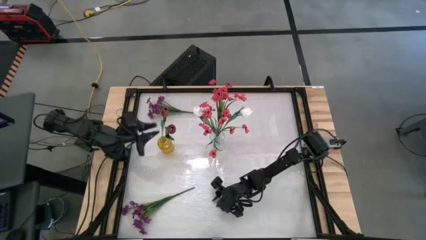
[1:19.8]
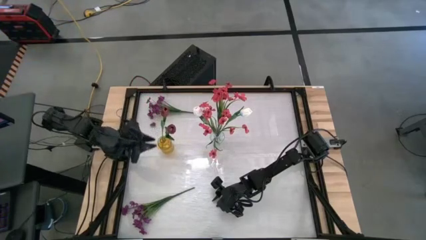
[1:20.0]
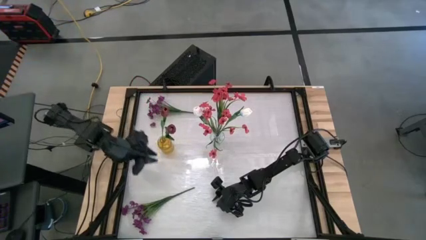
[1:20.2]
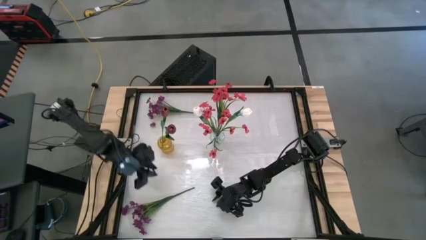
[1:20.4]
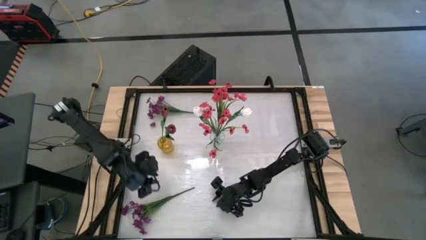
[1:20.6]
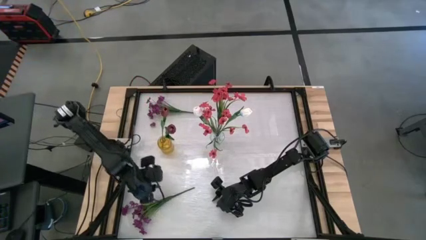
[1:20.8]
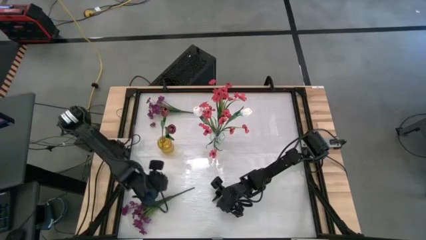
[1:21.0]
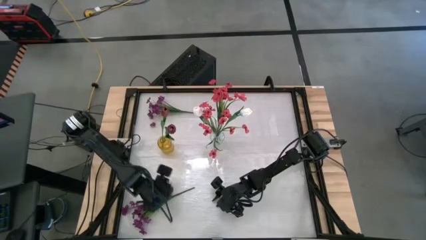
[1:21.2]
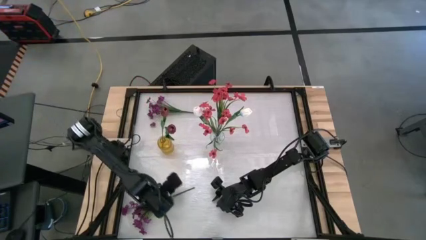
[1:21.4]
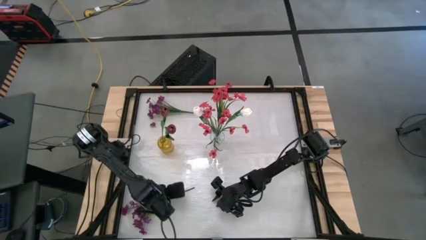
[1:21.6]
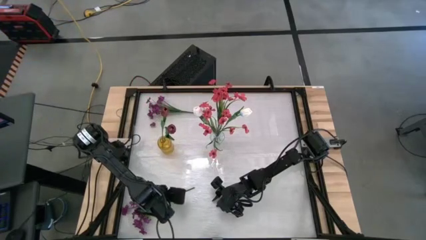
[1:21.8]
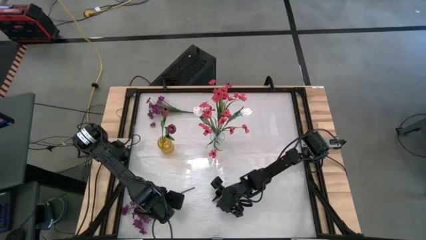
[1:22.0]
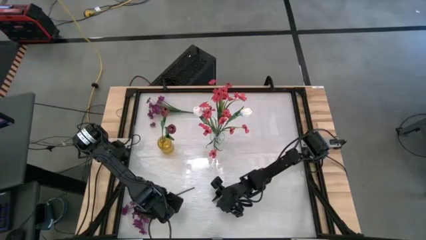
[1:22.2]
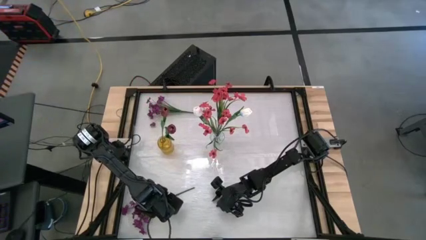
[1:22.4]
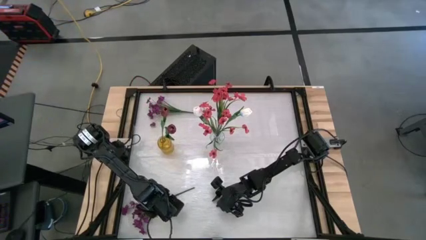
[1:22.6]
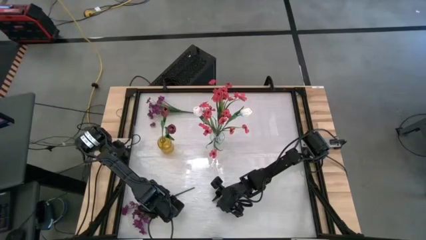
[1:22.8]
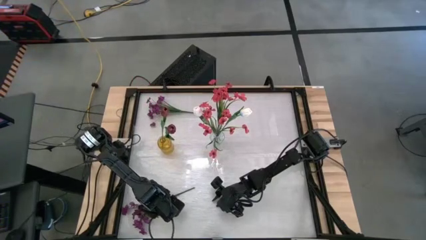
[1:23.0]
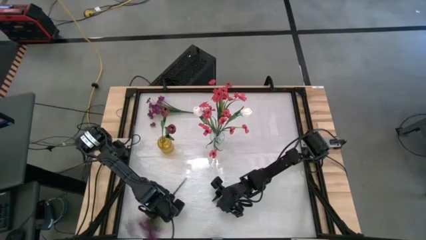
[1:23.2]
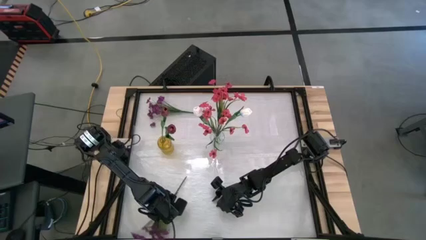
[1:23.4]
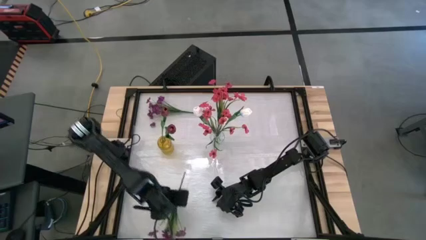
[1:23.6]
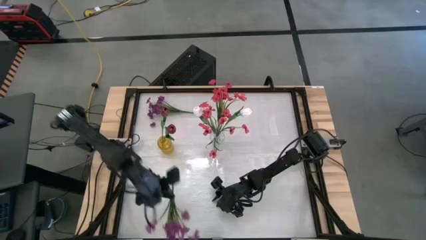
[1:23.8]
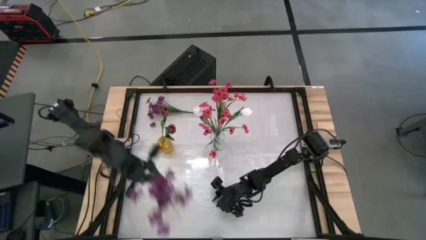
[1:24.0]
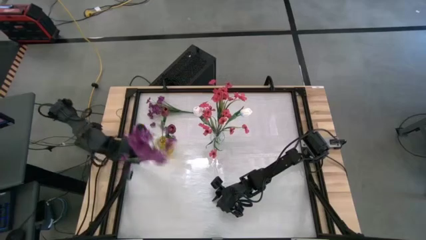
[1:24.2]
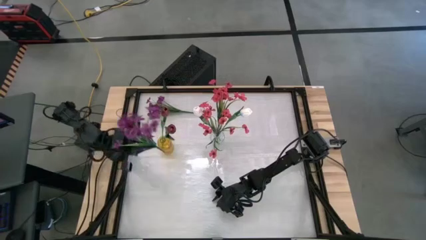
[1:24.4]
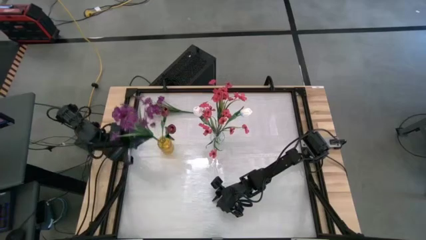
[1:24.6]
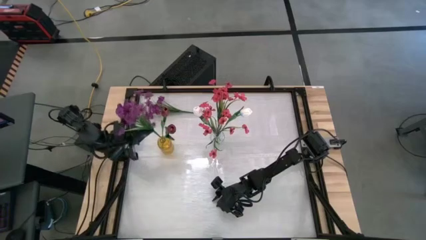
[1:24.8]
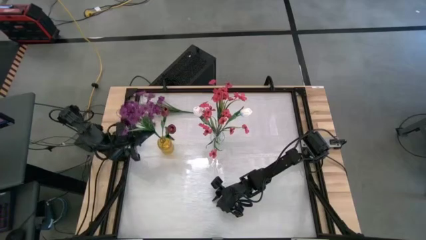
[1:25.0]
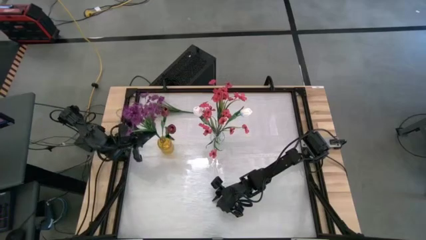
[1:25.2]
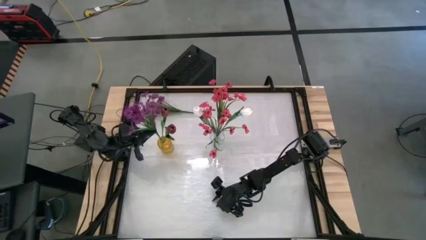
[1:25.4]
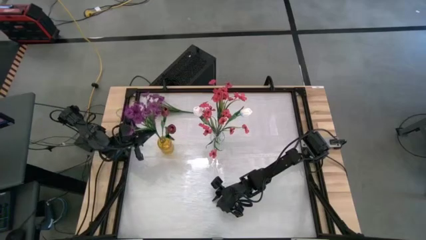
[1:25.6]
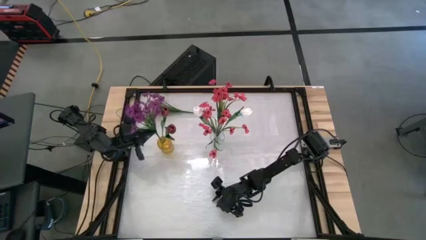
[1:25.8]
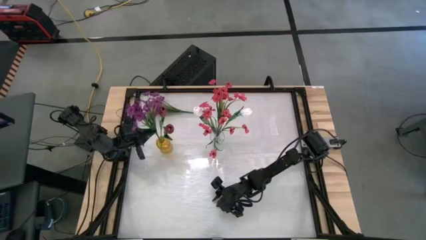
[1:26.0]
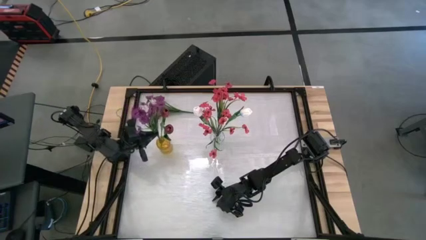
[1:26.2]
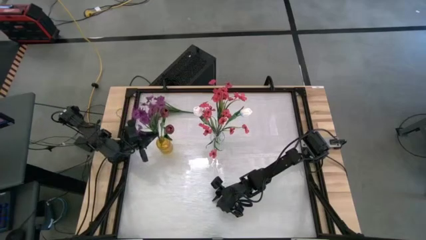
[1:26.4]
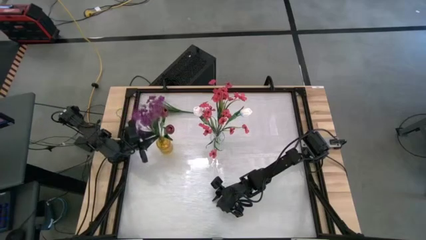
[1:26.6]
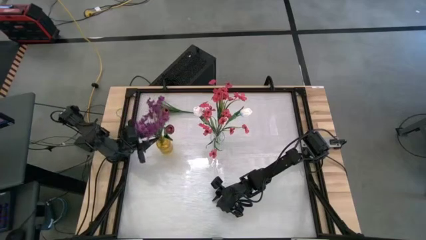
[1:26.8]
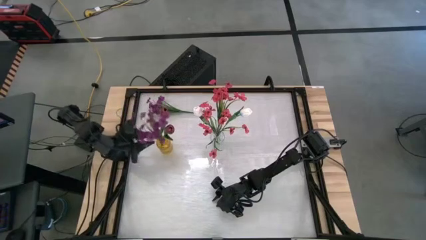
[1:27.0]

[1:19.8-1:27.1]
Task: Sort flowers into vase by color
Put the bottom purple flowers into the yellow vase

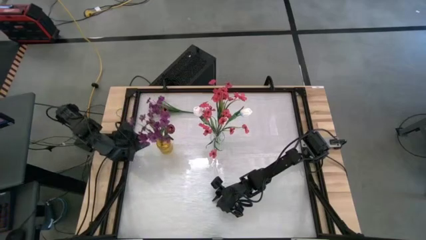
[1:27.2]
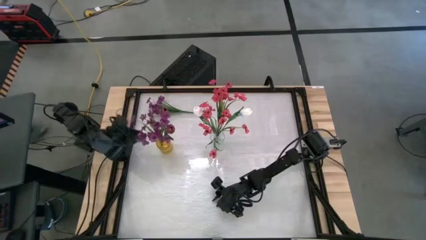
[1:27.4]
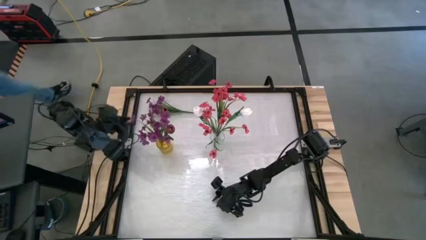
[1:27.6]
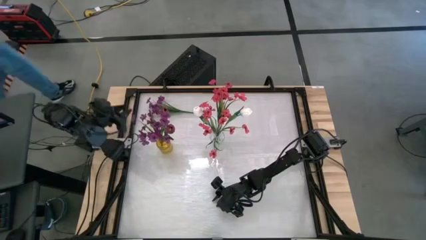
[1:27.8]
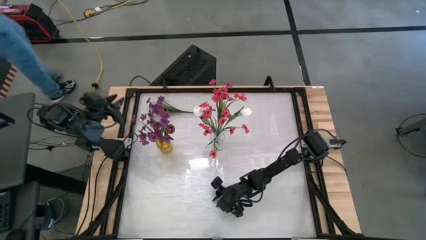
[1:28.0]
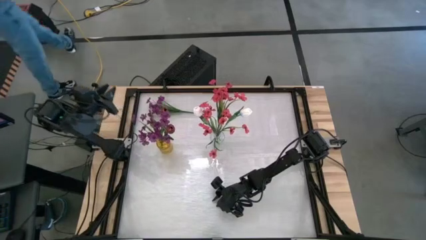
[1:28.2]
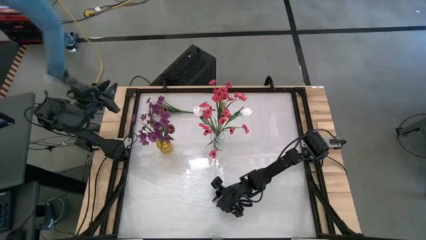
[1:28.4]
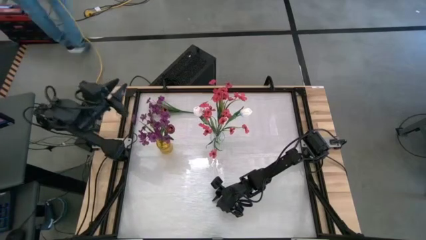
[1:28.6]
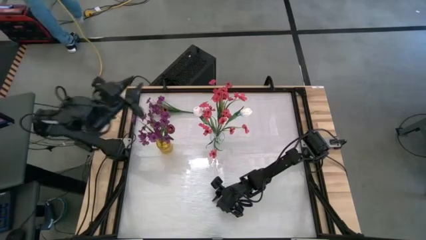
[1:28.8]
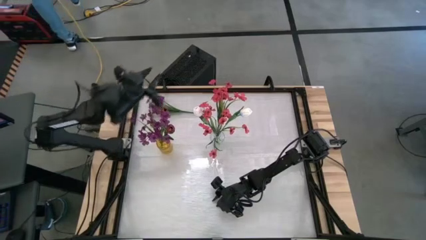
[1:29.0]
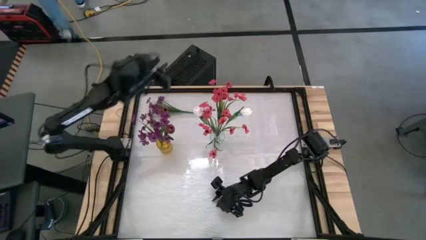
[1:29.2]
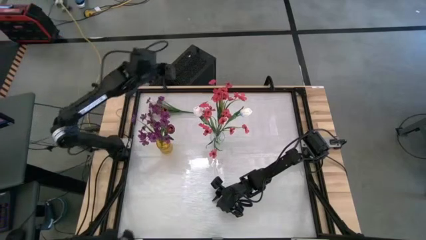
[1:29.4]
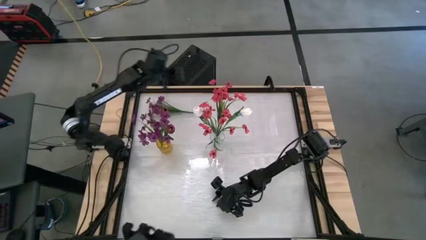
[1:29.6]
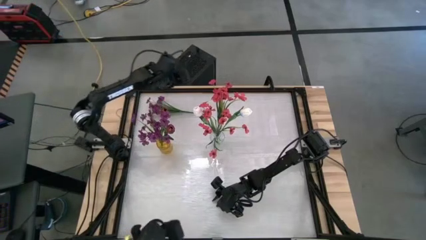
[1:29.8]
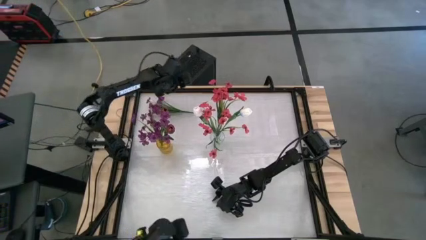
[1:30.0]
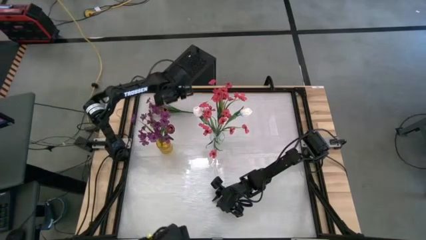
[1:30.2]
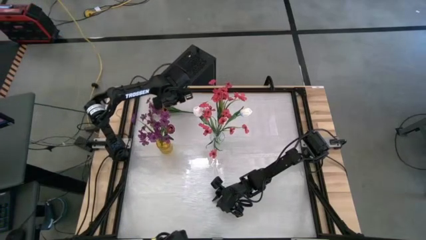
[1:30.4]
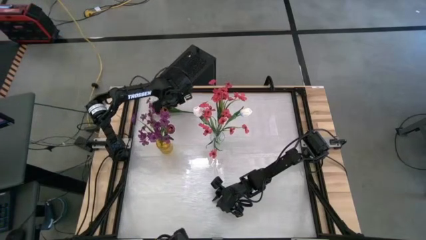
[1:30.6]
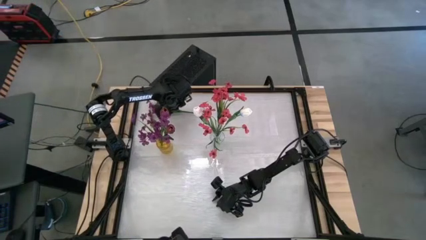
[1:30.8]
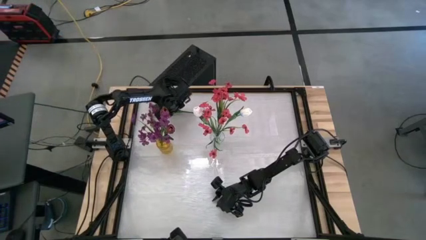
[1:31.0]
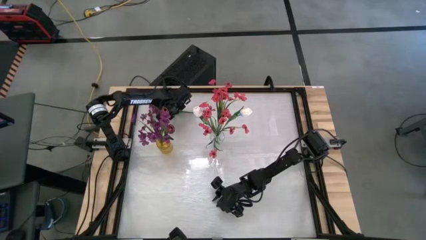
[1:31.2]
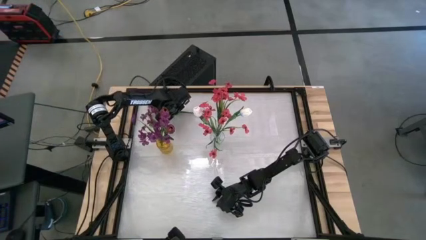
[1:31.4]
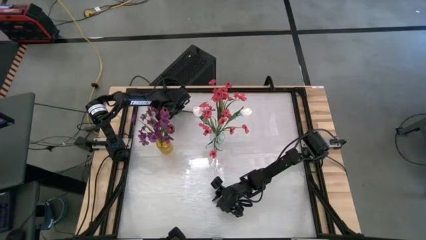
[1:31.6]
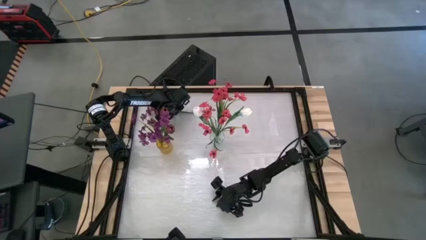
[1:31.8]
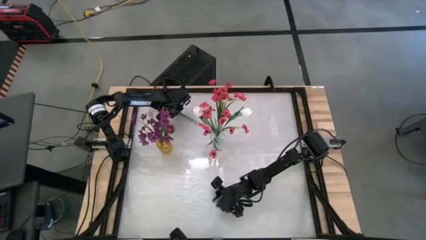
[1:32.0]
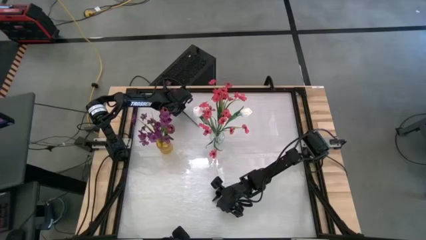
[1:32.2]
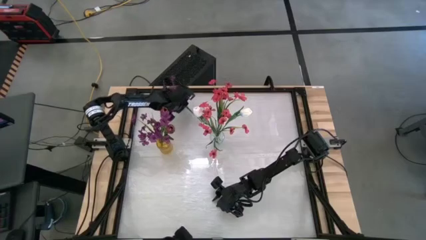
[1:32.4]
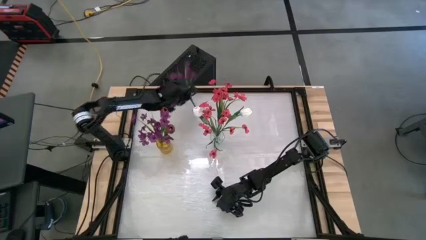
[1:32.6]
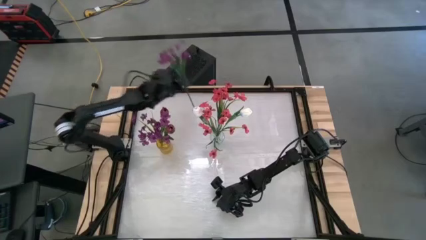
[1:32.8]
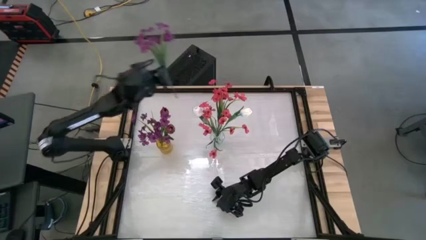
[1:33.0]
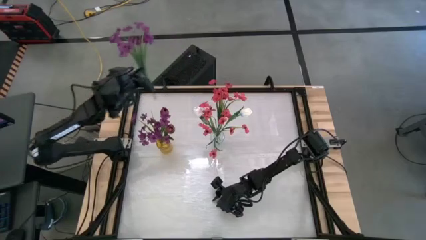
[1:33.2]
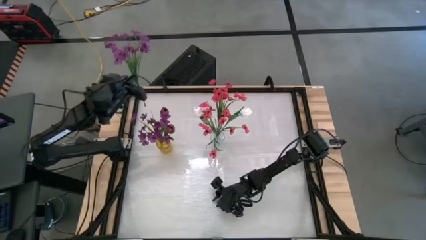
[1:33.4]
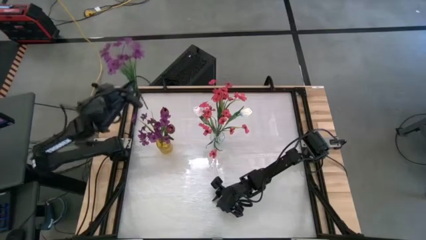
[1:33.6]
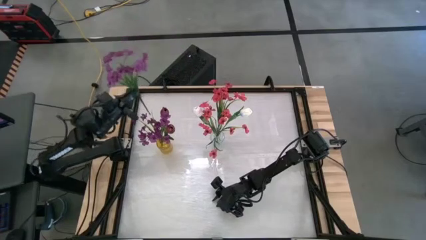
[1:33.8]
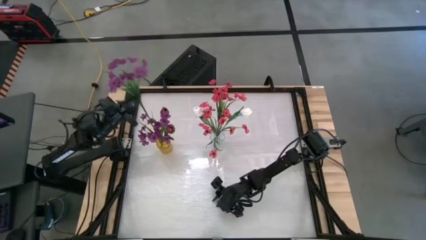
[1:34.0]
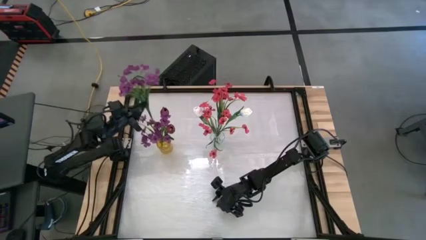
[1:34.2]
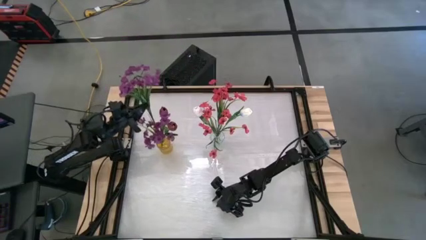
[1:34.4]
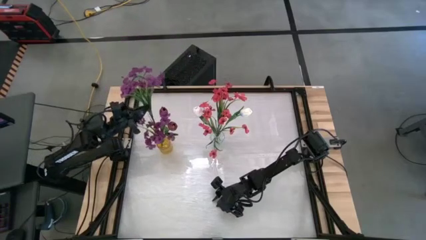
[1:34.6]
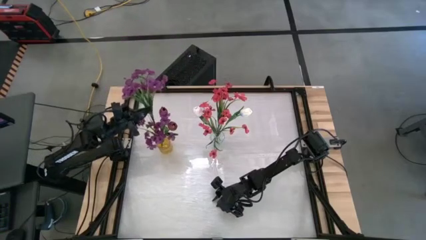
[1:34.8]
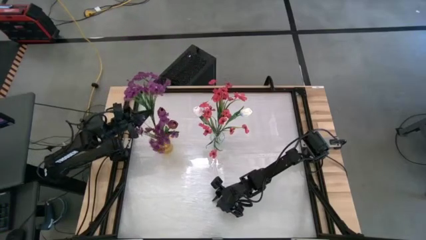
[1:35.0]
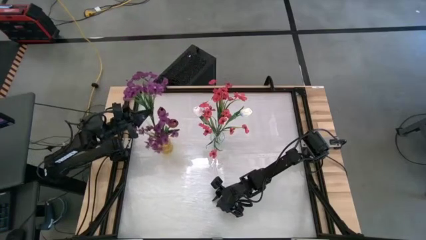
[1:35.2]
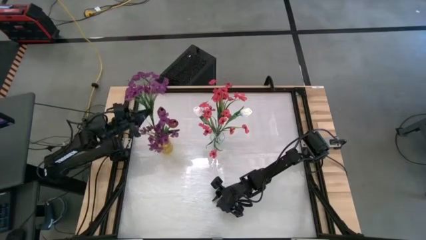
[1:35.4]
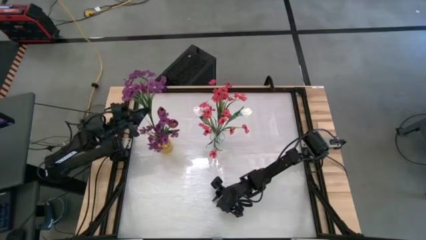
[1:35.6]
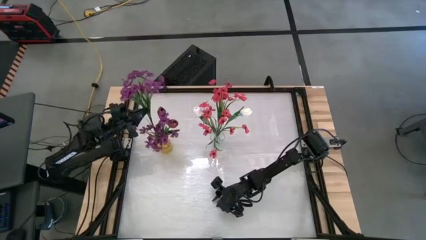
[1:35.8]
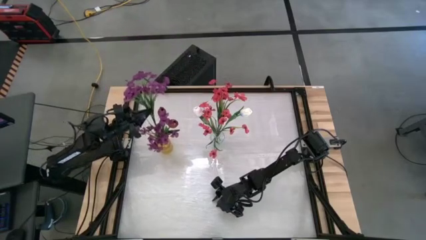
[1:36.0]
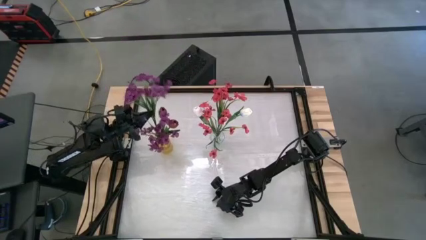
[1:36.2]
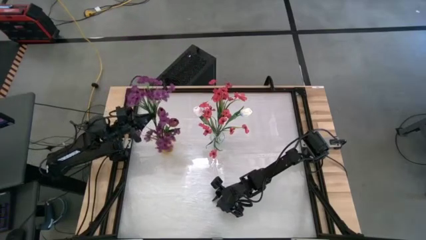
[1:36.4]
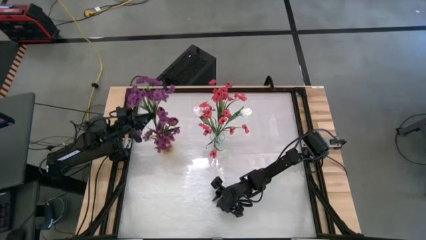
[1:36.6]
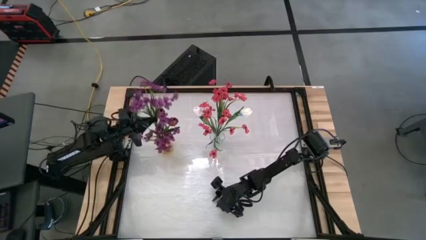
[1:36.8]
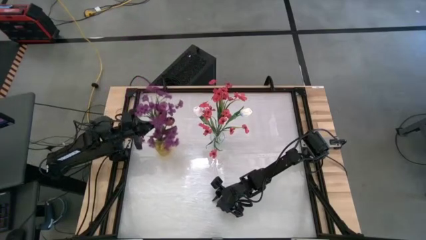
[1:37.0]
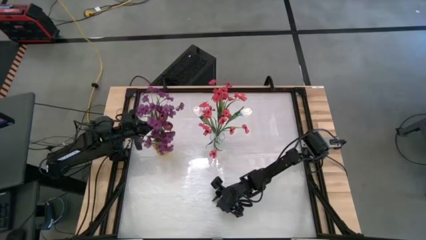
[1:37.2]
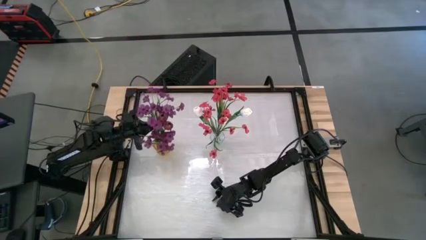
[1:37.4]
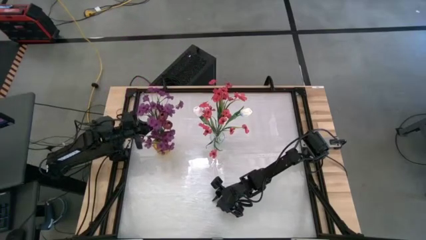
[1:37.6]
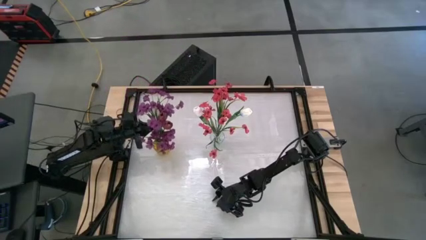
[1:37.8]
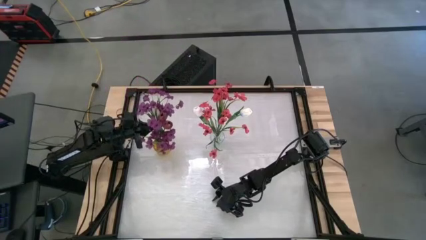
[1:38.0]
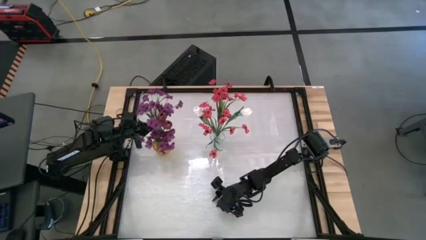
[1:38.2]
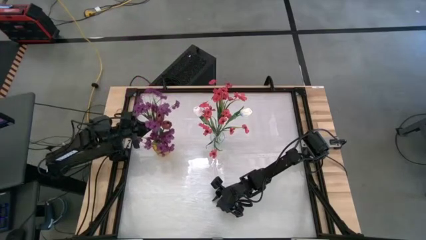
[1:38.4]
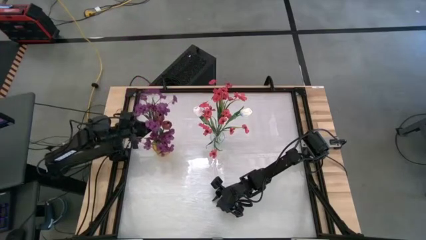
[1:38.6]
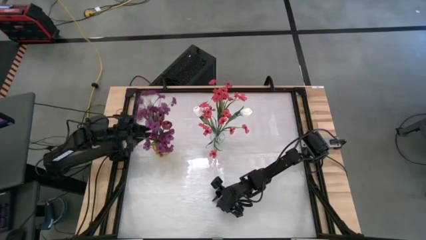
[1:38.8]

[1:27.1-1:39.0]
Put the purple flowers into the yellow vase
